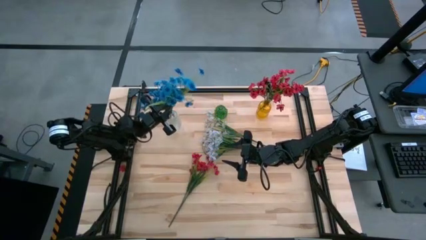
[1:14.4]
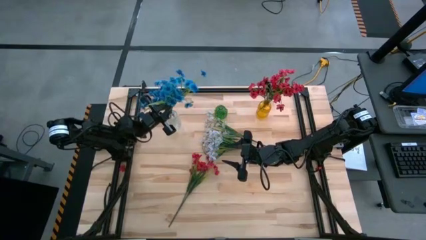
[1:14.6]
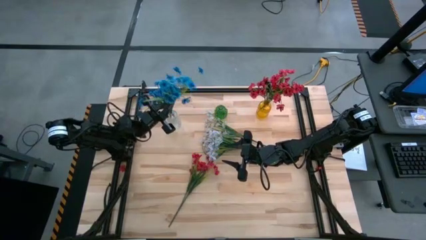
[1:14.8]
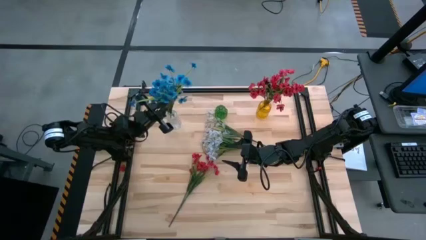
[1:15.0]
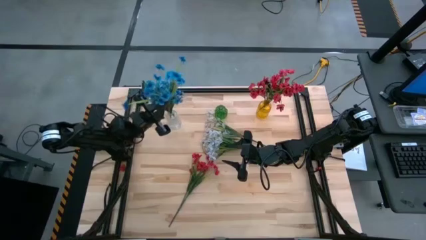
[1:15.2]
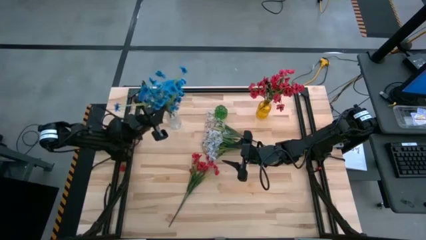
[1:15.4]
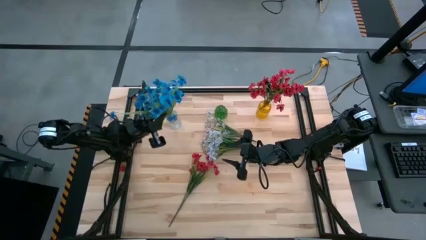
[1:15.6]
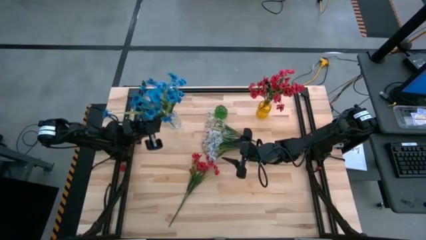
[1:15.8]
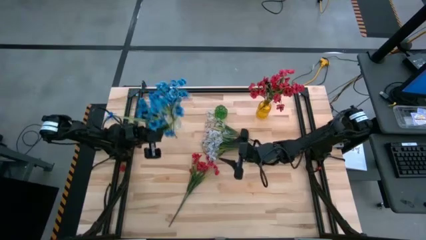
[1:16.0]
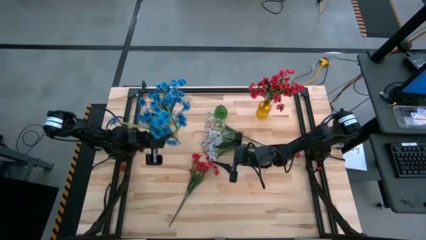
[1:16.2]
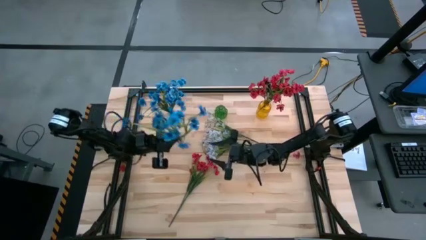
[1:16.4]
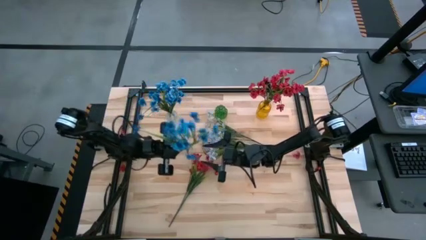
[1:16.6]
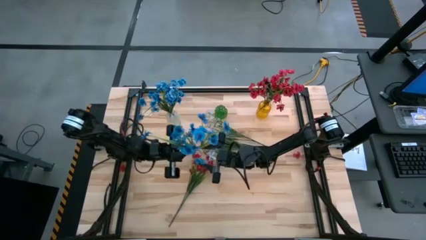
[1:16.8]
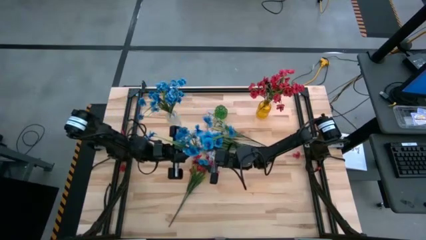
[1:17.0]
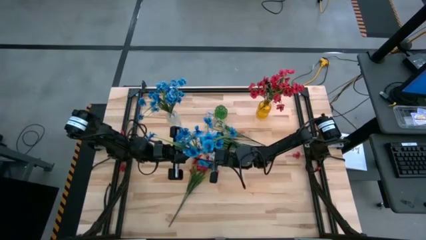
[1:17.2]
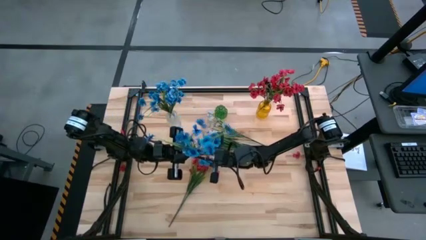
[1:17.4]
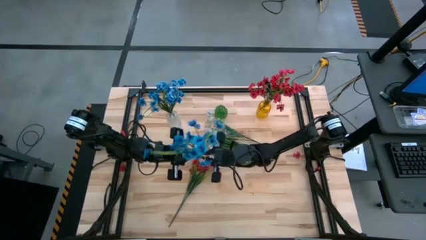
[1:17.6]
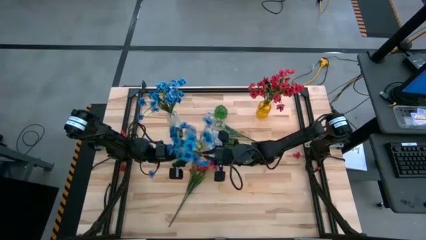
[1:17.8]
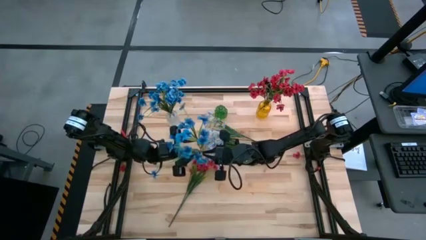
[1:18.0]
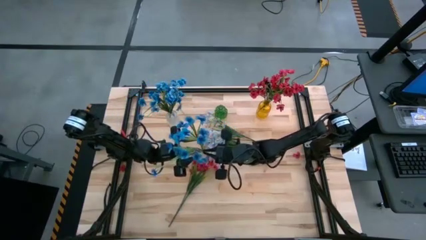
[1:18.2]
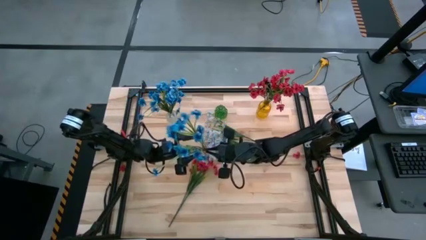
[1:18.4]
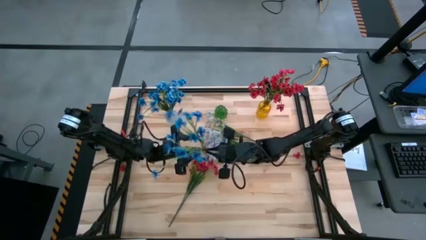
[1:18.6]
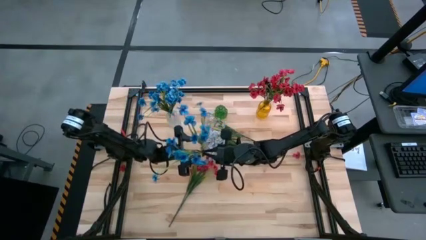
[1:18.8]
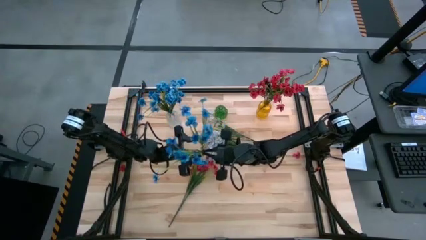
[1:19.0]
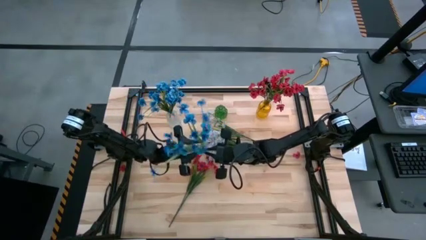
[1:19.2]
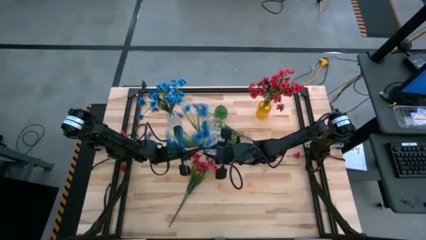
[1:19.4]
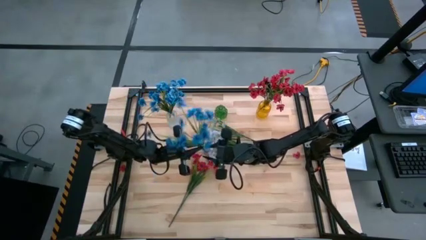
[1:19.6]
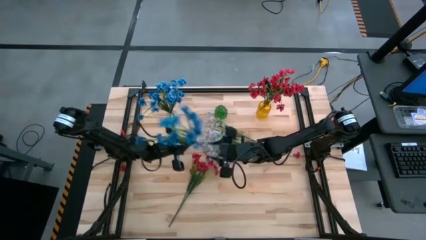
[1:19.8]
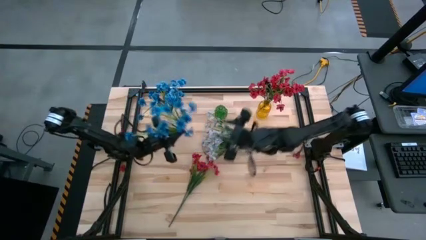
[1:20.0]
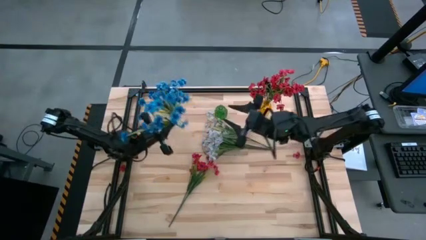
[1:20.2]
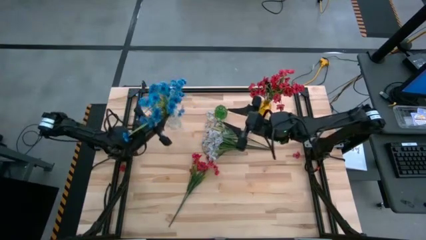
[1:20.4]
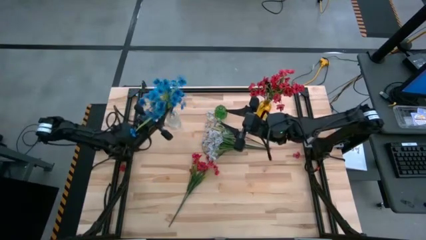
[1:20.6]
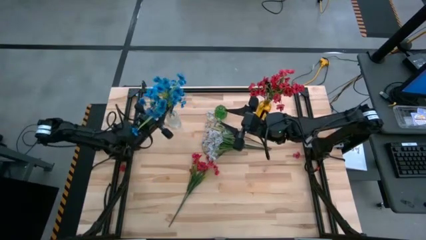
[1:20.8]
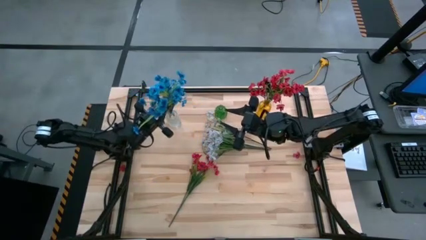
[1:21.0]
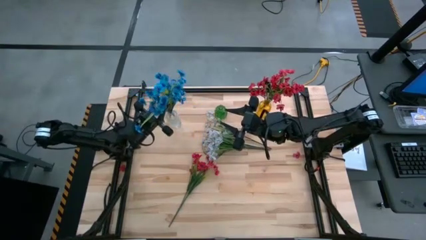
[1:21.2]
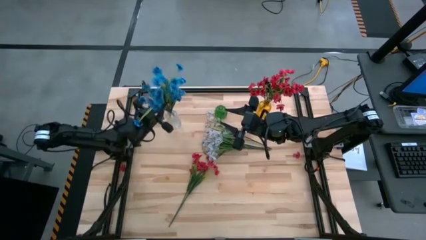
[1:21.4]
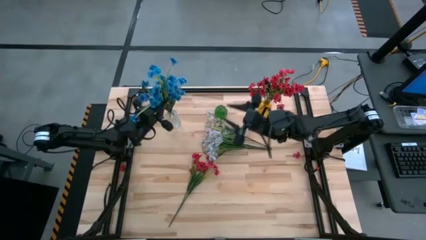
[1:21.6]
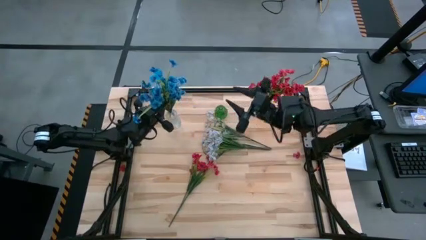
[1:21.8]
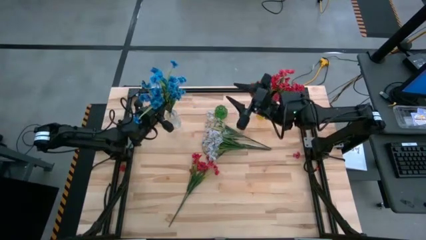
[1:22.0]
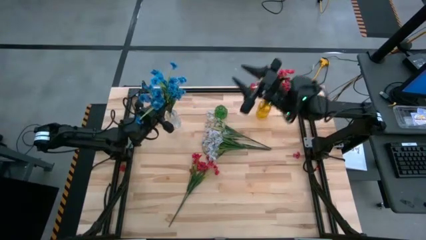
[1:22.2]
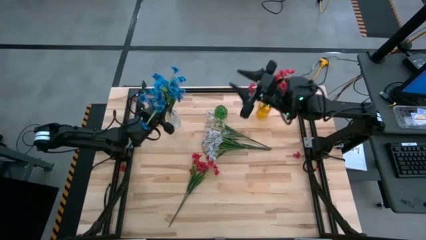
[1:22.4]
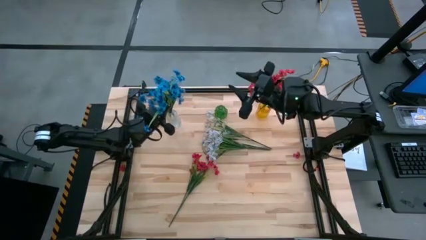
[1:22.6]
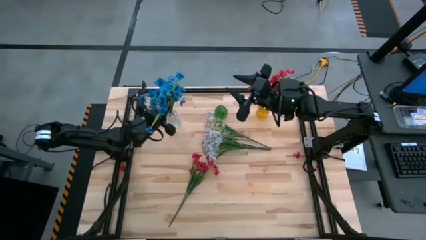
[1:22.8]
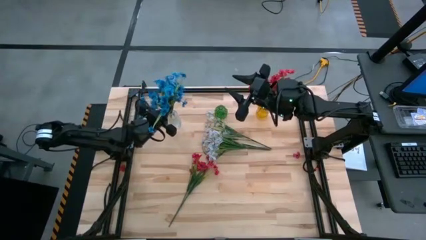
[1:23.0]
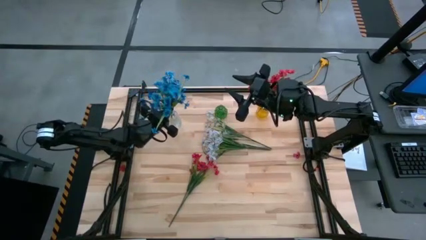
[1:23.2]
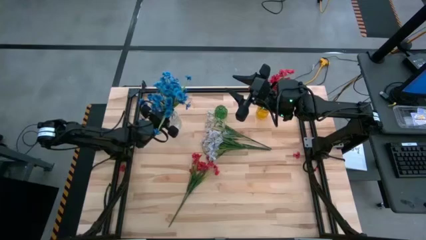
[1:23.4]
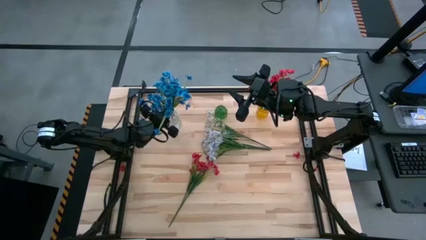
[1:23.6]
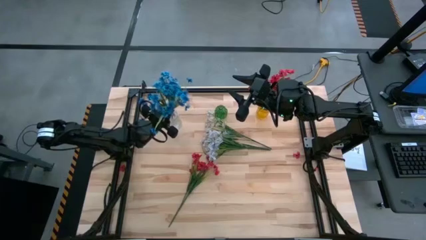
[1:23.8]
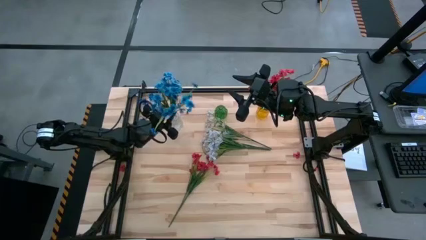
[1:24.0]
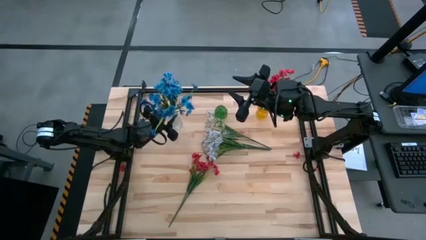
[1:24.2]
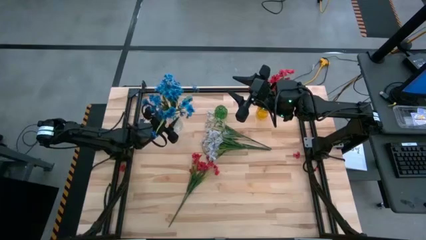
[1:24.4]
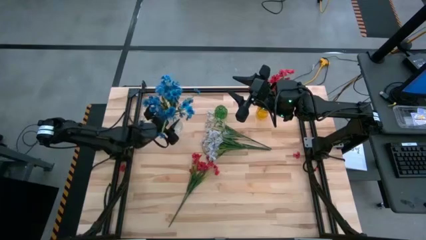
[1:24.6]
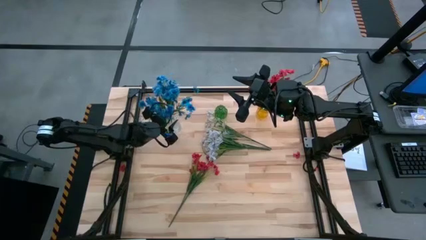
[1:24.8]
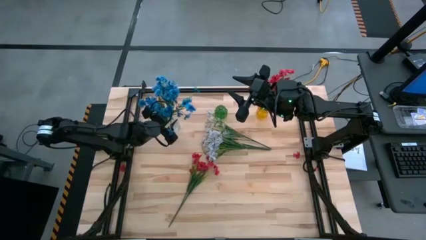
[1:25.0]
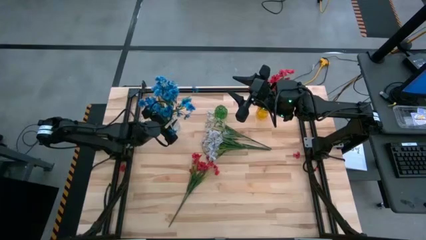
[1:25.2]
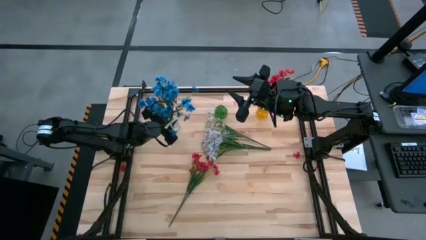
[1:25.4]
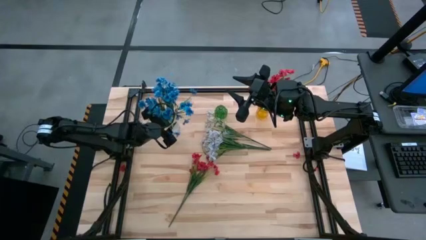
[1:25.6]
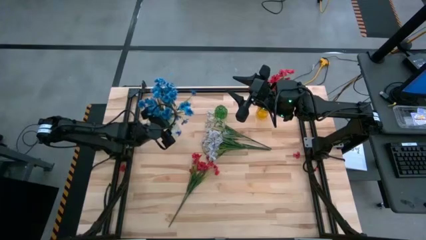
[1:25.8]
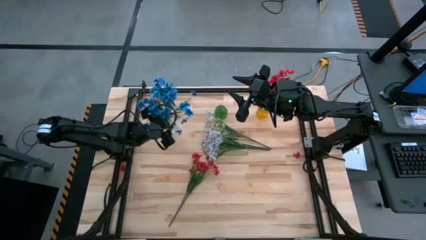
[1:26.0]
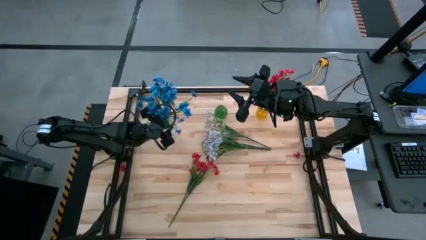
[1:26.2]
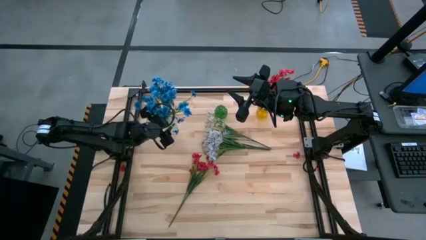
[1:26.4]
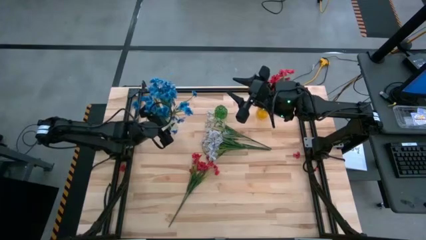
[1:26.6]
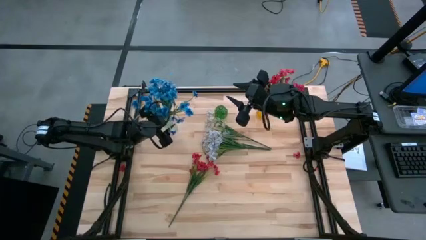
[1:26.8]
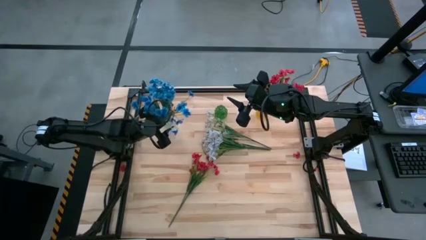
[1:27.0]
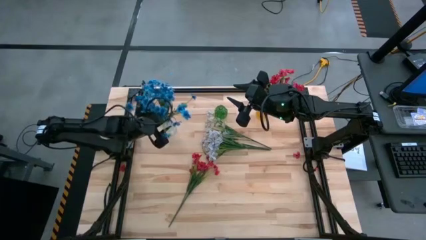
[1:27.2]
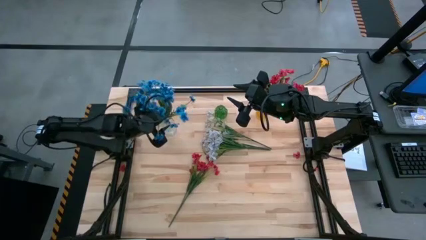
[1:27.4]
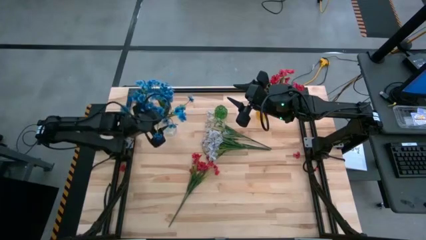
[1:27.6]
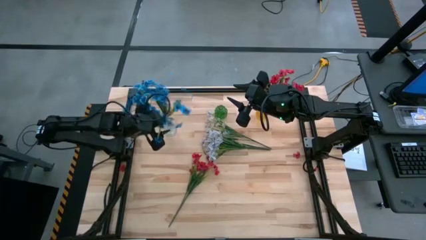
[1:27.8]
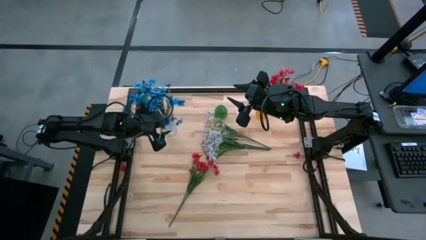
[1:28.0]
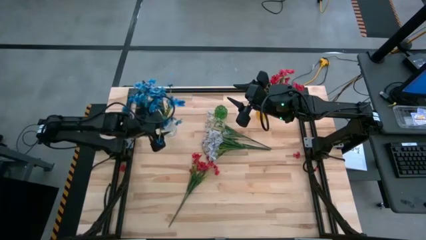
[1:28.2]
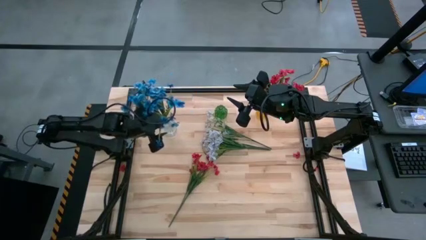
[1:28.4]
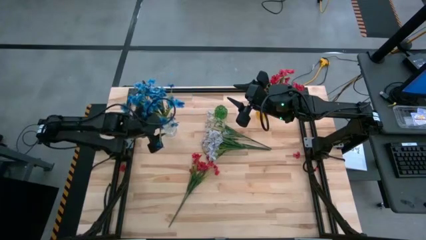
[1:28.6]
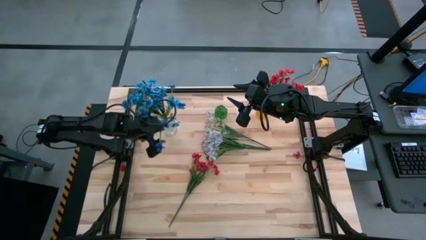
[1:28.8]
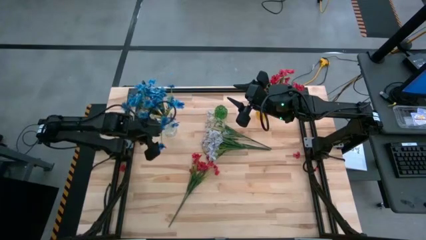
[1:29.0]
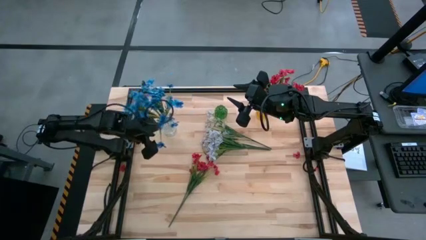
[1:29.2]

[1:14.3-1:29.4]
Task: Sort flowers into vase by color
Put the blue flowers into the transparent vase
